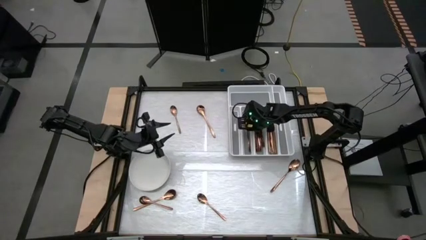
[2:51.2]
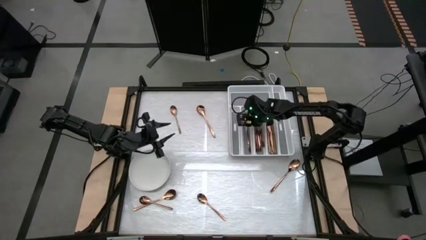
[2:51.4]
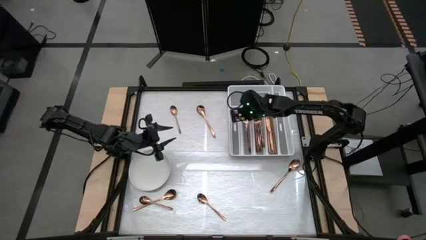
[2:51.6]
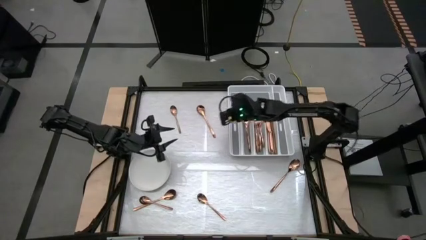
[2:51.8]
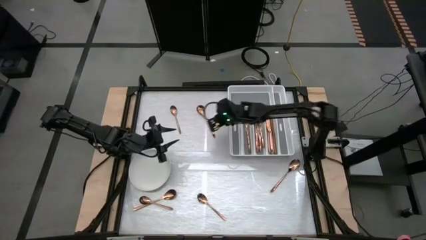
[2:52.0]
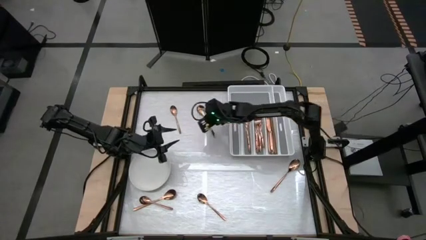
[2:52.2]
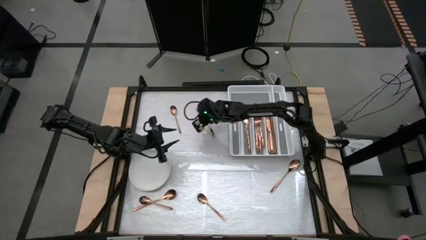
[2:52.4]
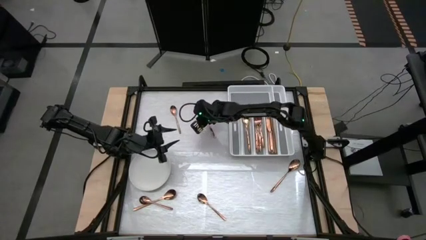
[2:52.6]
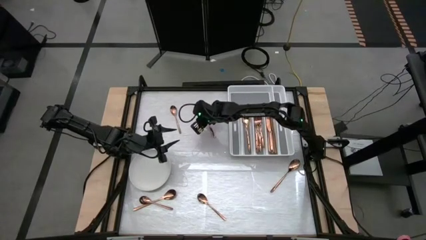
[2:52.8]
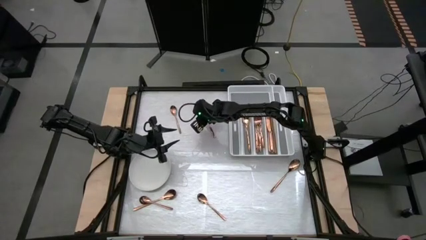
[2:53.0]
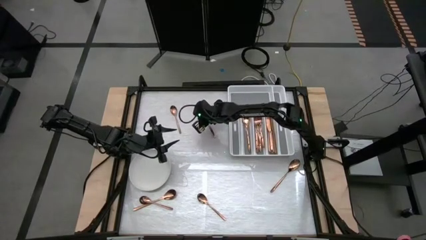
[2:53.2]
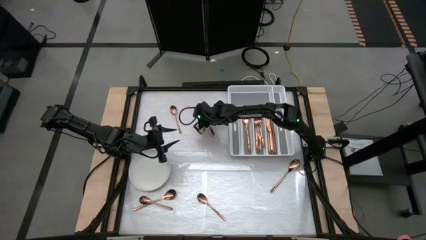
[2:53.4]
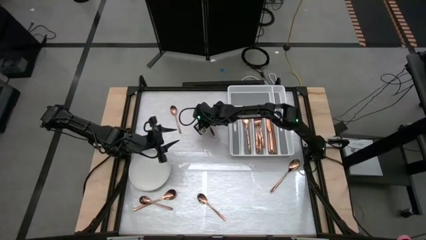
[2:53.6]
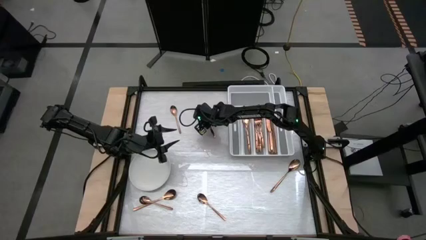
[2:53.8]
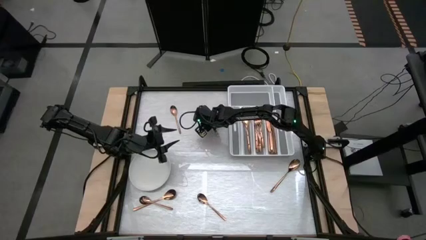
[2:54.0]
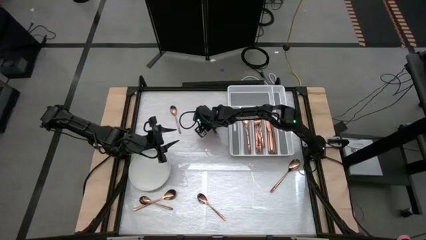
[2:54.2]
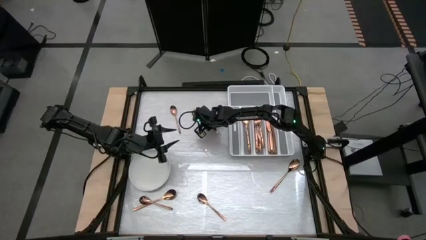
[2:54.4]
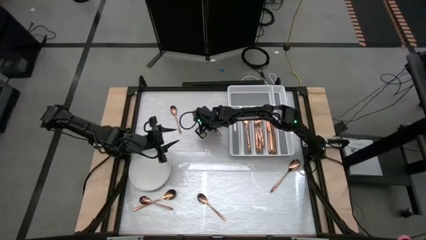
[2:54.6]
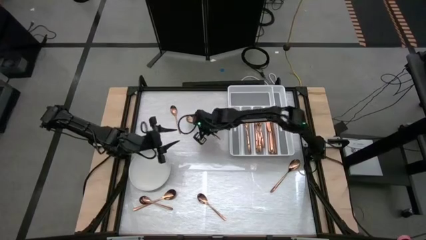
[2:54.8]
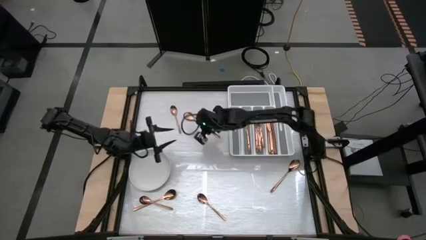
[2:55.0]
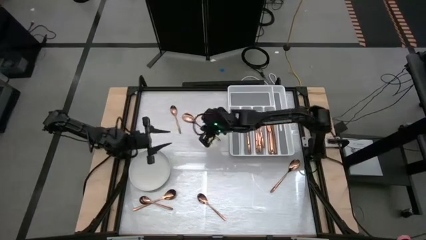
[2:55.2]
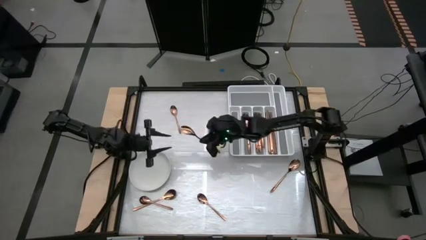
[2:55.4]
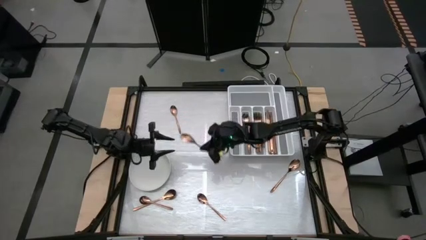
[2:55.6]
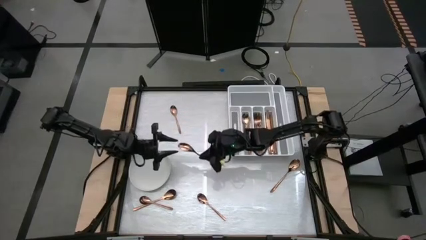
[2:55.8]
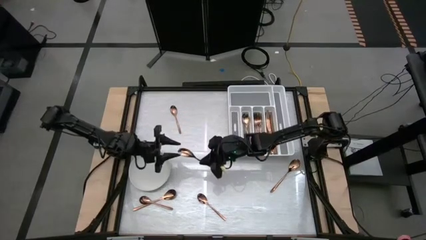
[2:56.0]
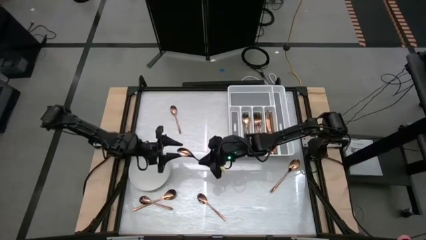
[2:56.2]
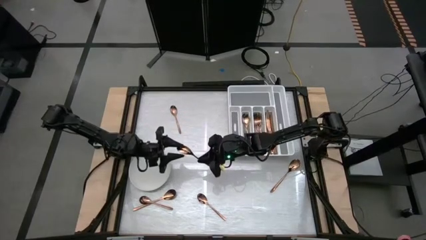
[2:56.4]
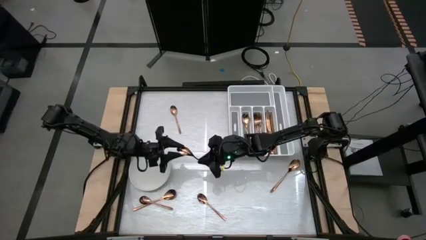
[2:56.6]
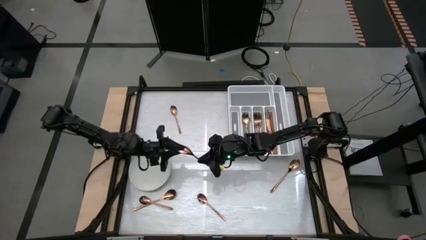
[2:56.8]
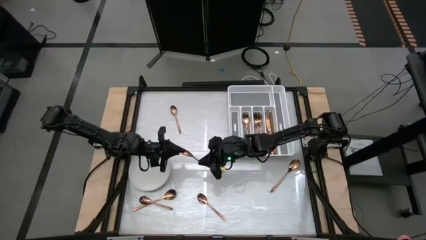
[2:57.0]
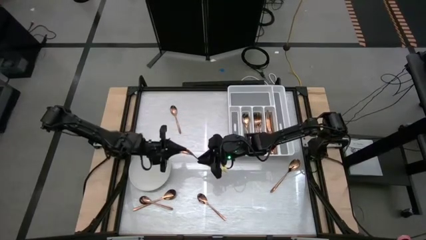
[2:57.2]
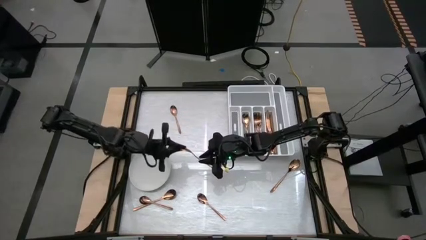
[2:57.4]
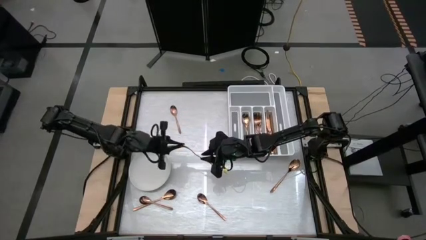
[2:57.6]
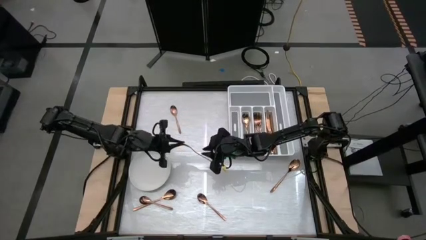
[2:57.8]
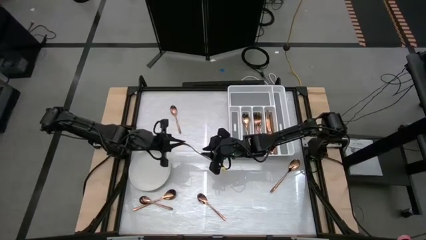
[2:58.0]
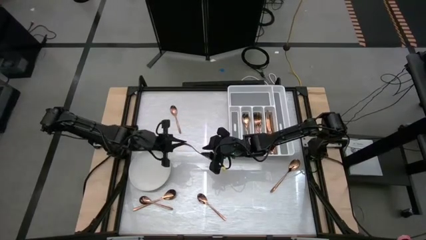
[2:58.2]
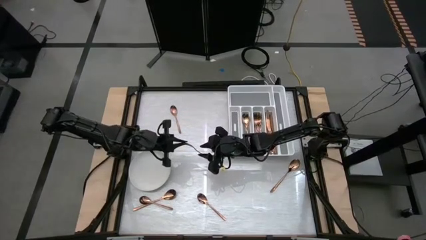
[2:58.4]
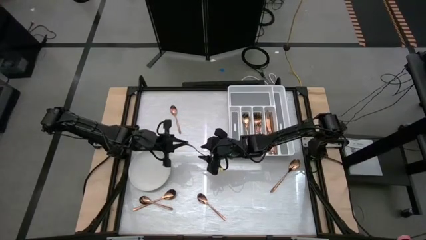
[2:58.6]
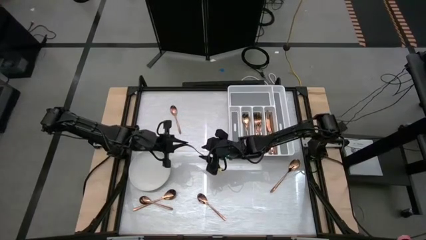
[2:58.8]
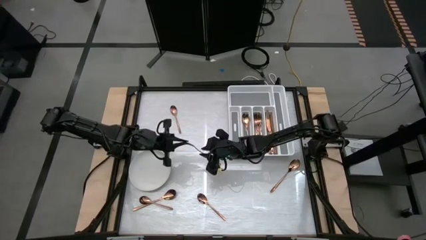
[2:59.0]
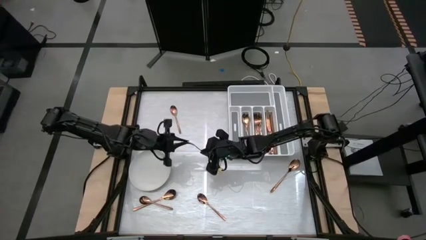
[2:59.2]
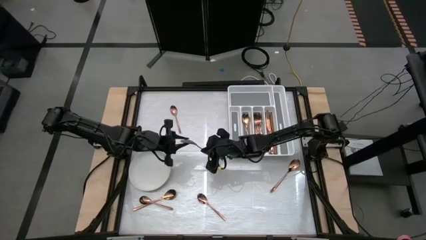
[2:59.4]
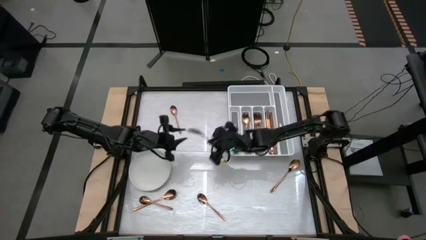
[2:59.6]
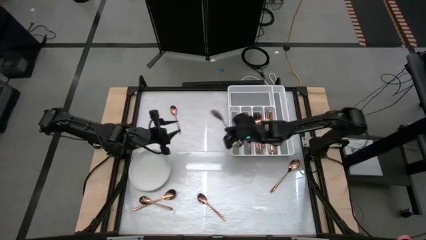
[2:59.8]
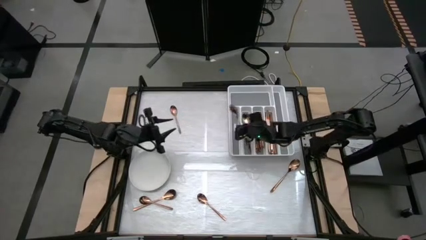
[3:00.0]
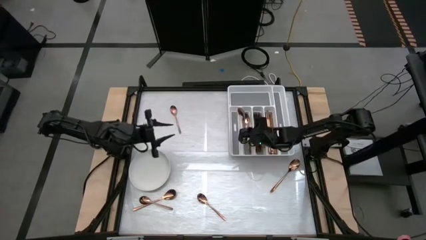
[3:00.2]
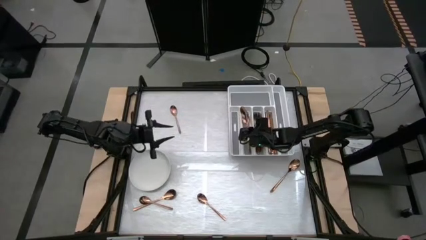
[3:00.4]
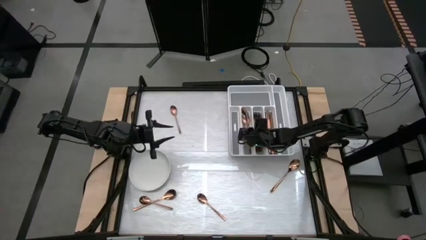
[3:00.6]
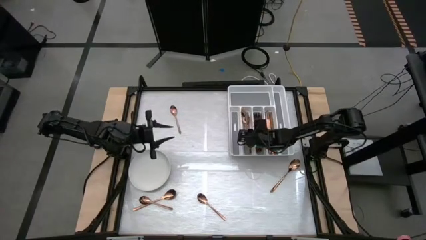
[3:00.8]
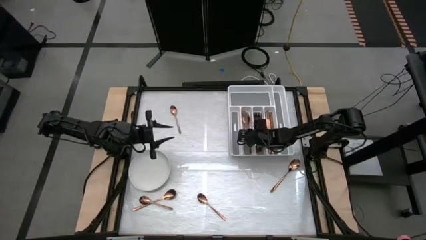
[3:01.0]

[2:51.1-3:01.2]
Task: Sort silverware
Put the bronze spoon into the silverware tray

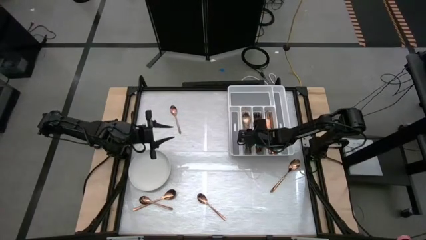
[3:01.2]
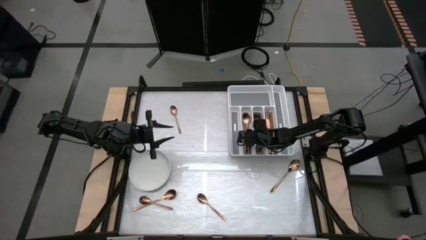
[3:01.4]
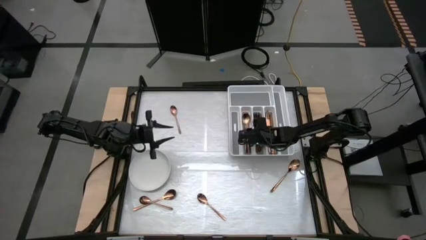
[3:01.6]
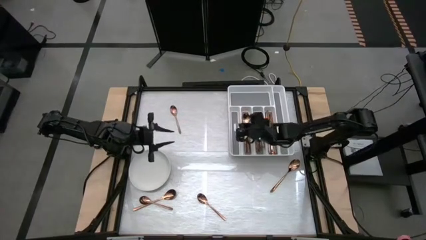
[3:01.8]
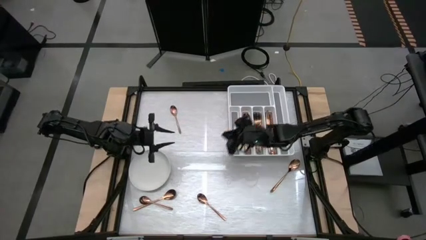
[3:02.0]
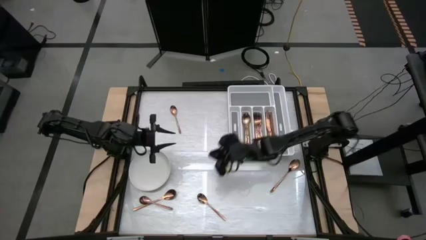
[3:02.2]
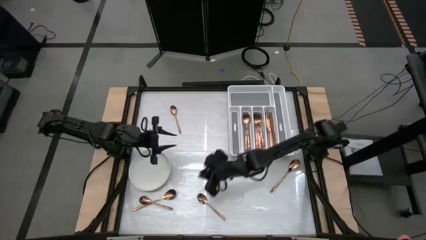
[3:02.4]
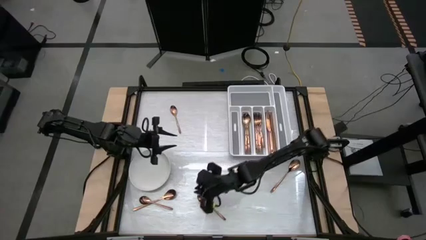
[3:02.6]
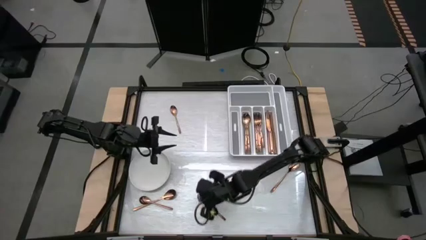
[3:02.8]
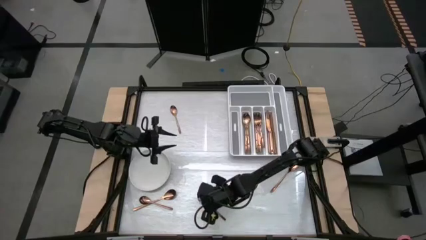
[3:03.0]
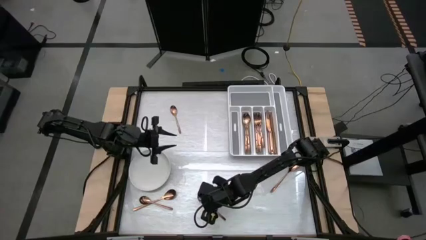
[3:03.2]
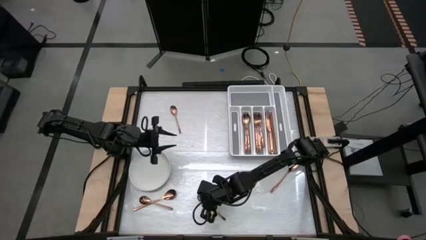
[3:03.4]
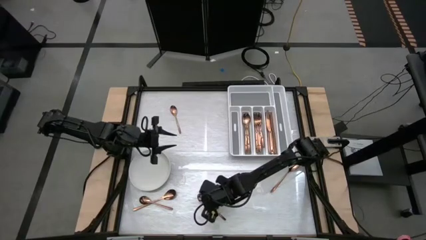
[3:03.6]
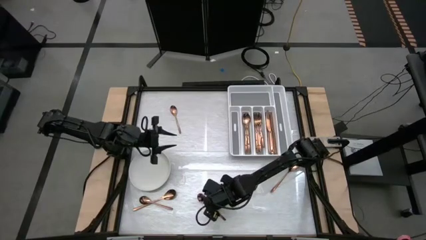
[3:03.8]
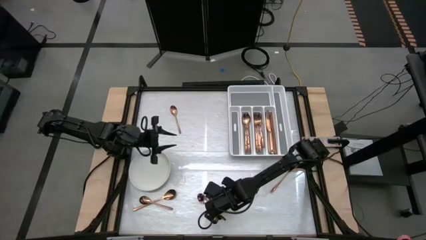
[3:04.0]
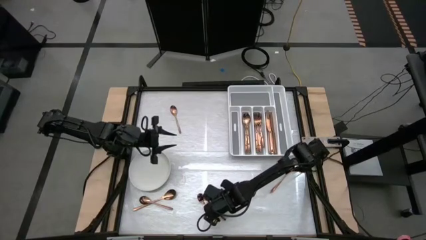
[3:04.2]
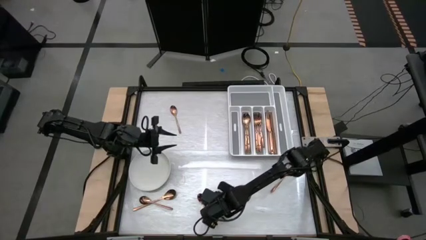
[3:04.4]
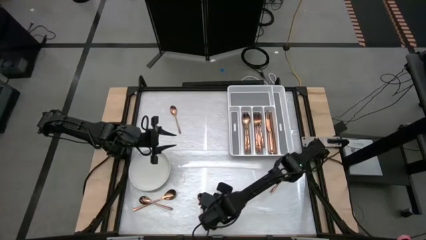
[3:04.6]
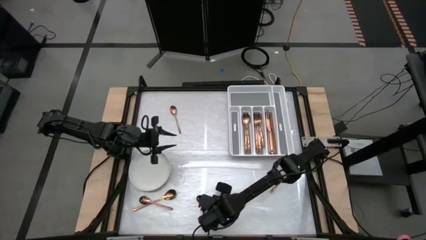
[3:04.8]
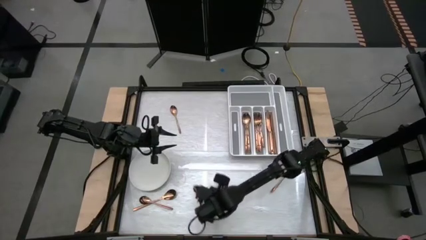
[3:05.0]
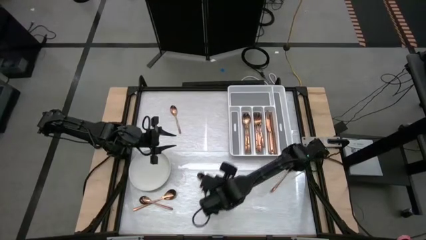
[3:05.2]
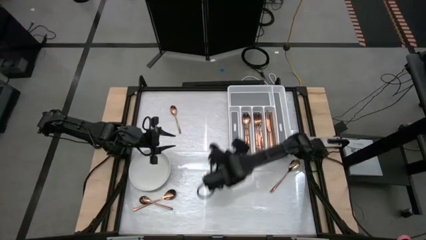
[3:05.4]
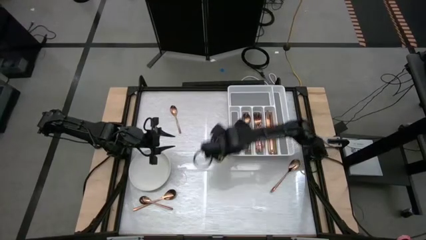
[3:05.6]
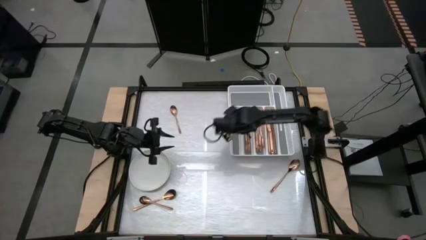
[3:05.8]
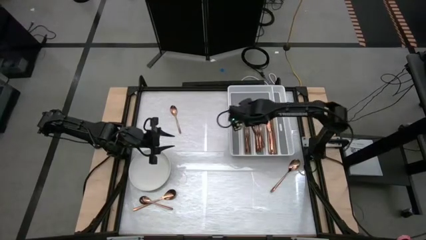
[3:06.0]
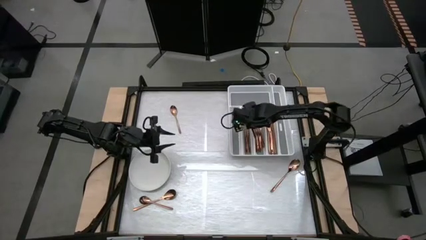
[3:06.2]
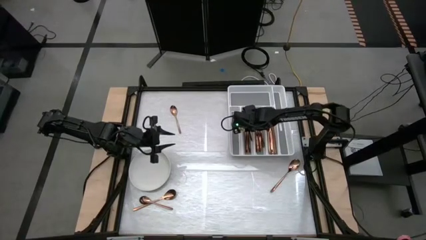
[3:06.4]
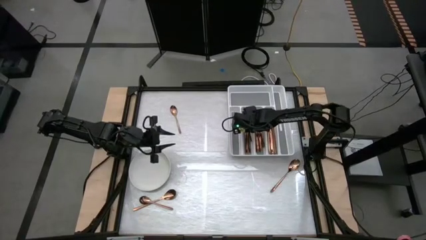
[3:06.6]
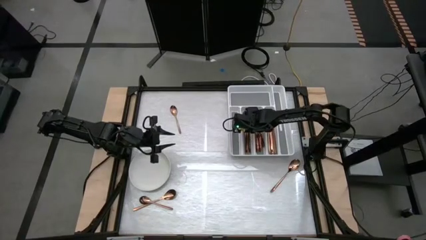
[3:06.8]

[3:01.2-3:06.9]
Put the bronze spoon into the silverware tray
